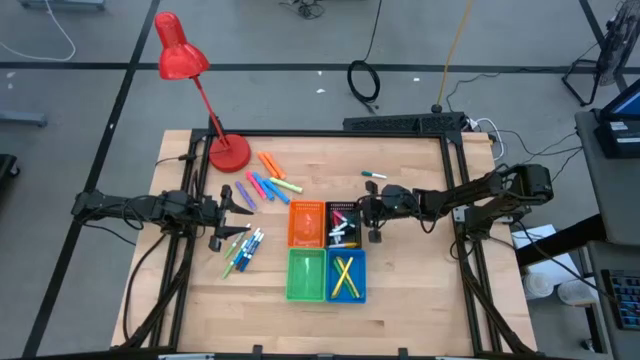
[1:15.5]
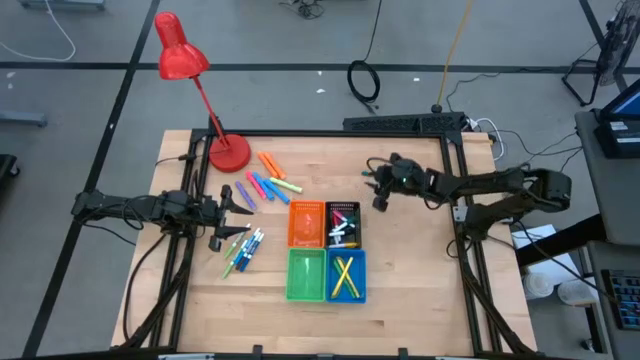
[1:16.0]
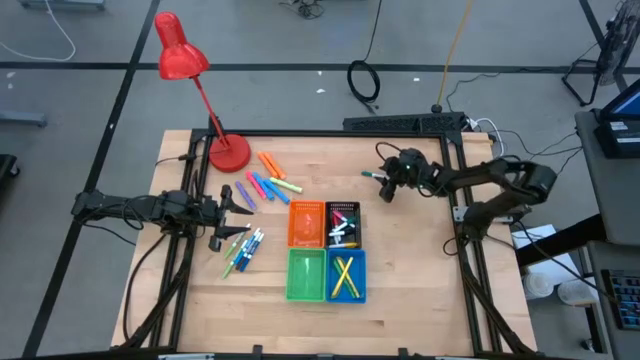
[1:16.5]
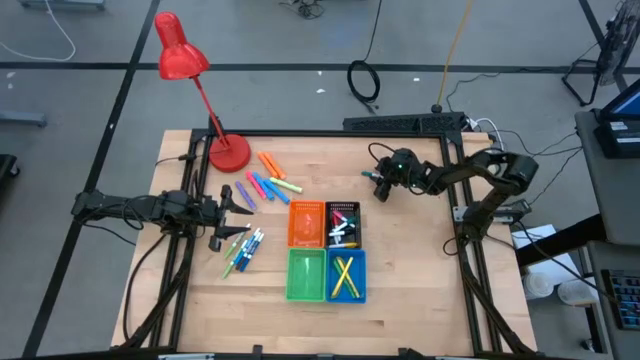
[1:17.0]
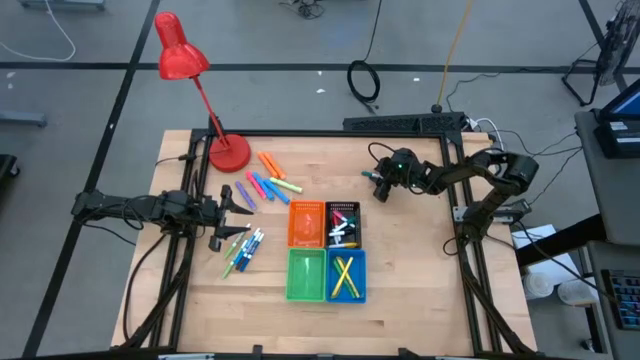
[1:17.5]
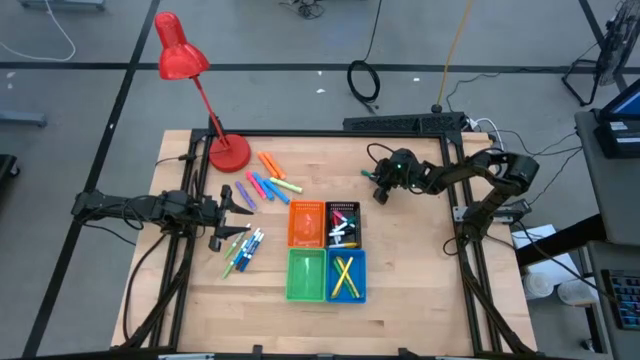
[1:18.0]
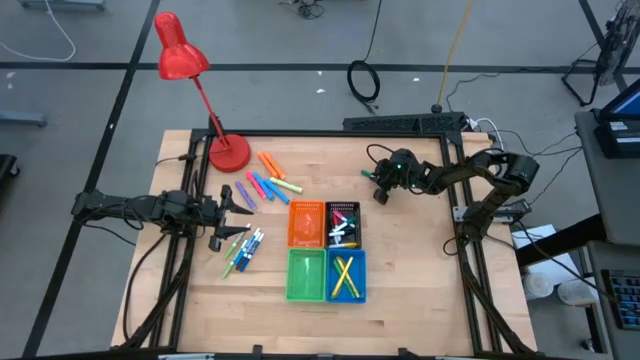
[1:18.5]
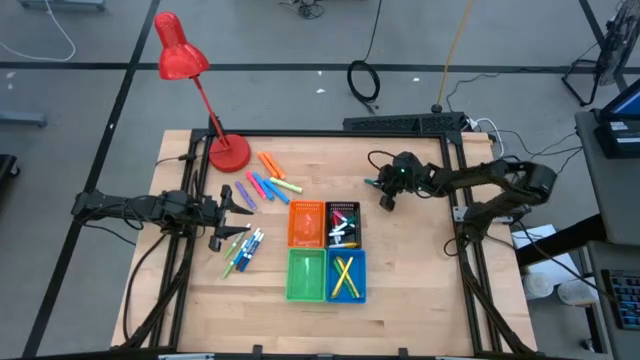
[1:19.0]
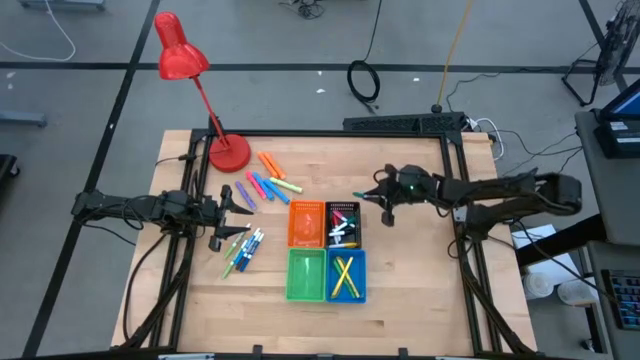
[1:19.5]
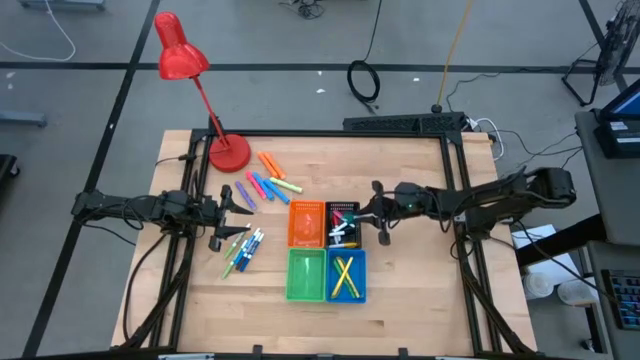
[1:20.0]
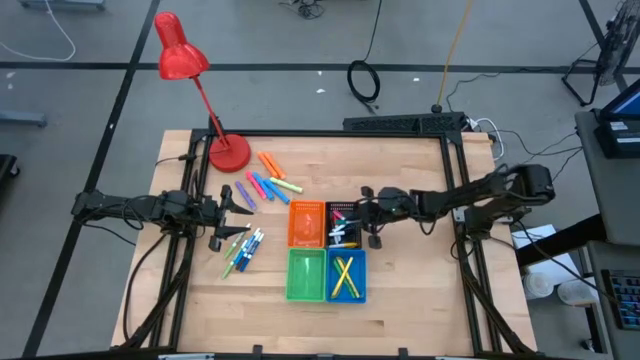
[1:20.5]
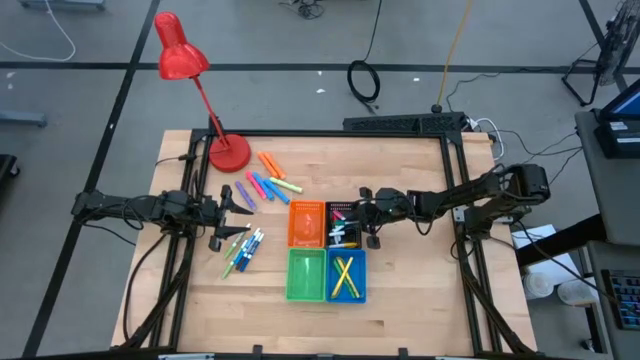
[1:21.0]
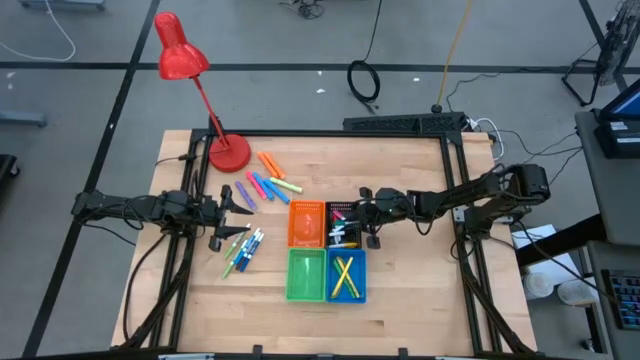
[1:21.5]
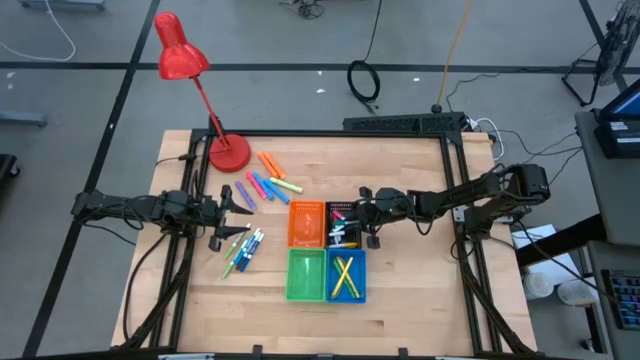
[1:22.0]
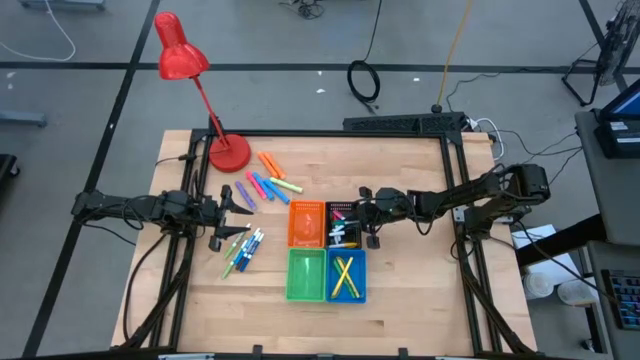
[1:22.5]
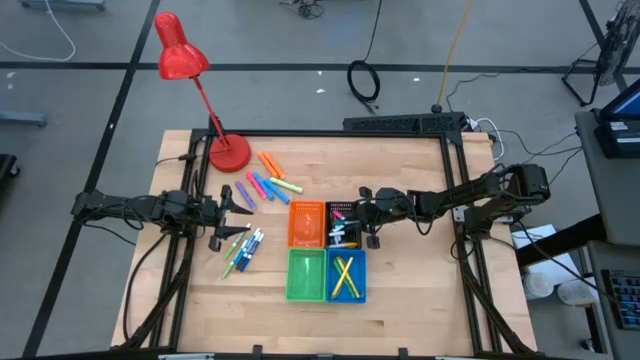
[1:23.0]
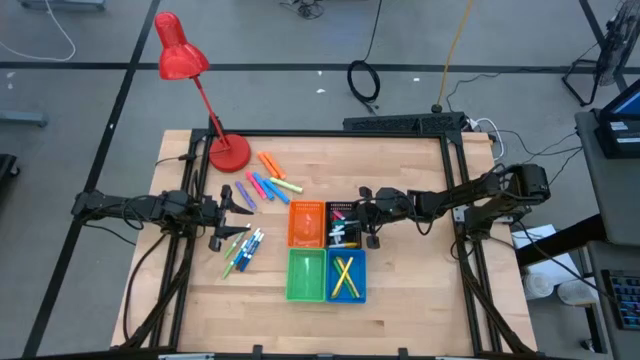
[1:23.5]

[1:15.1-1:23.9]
Task: Pick & Place Markers
Put the green highlighter pen into the black basket

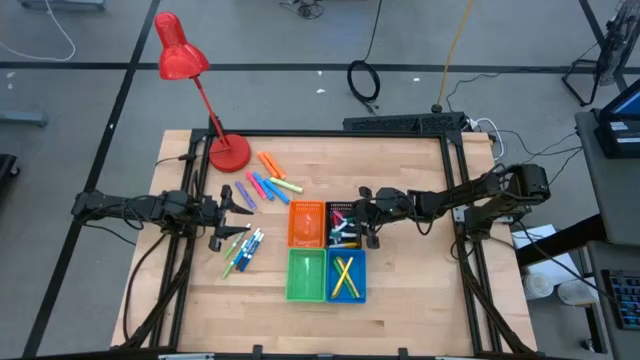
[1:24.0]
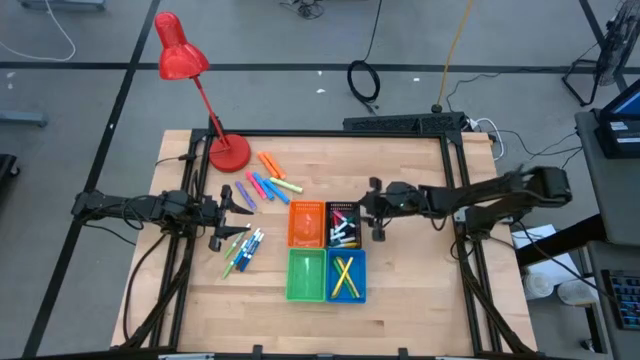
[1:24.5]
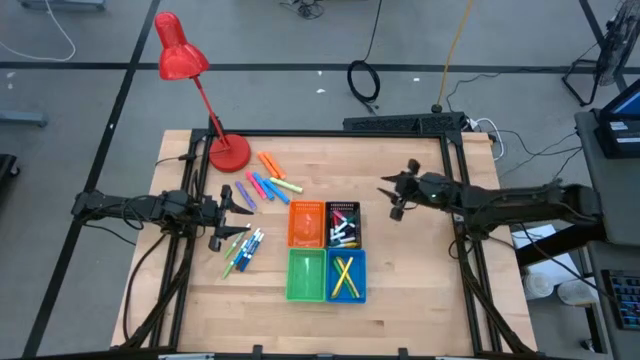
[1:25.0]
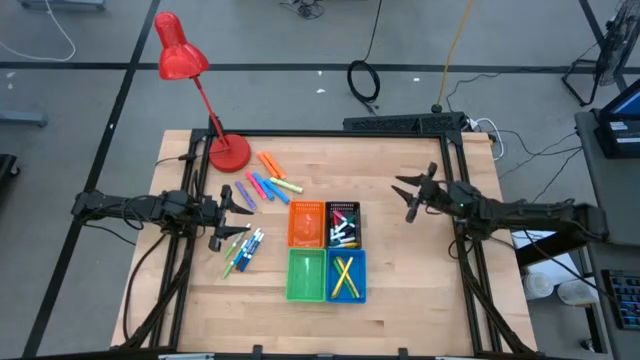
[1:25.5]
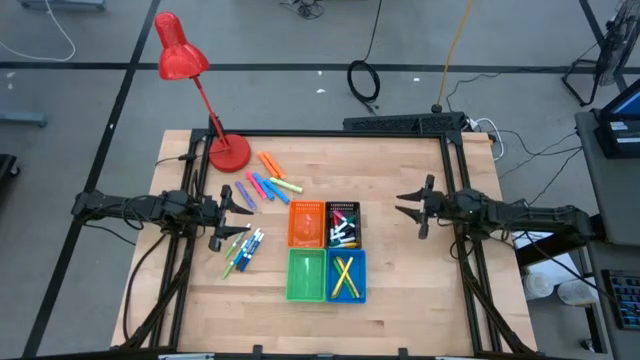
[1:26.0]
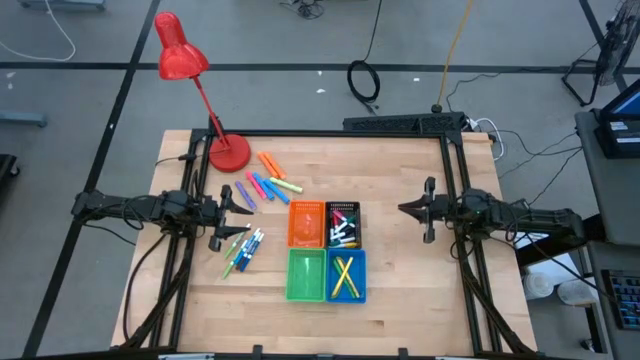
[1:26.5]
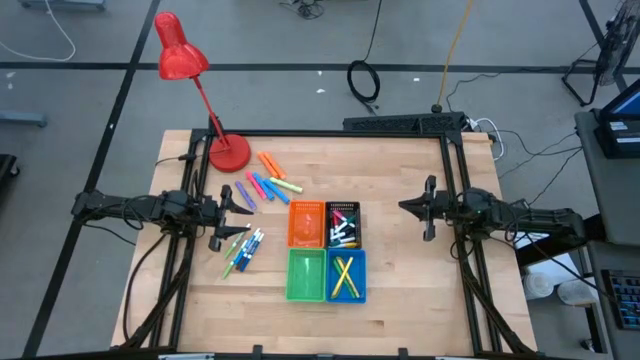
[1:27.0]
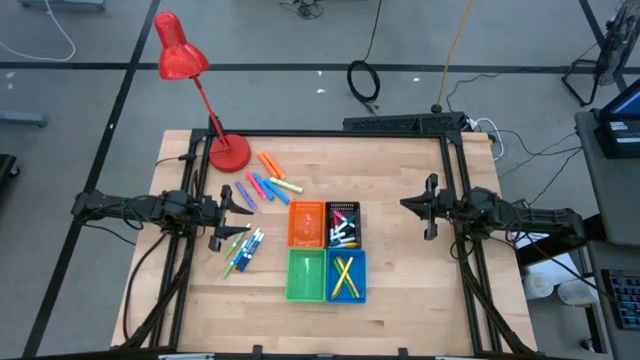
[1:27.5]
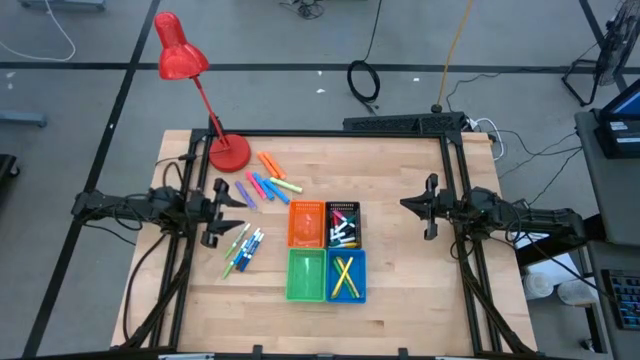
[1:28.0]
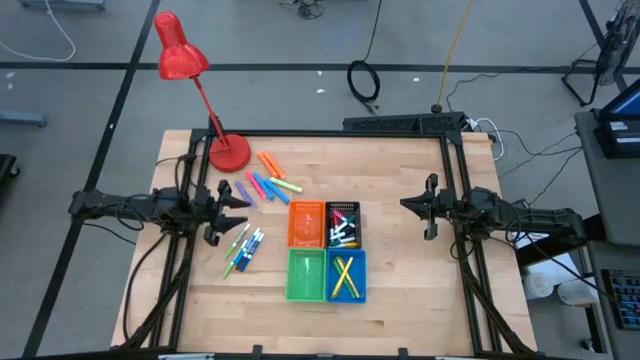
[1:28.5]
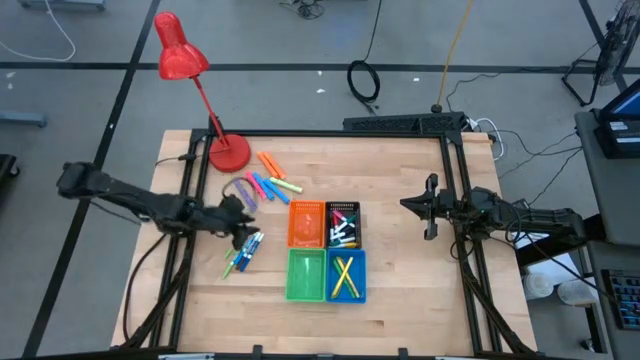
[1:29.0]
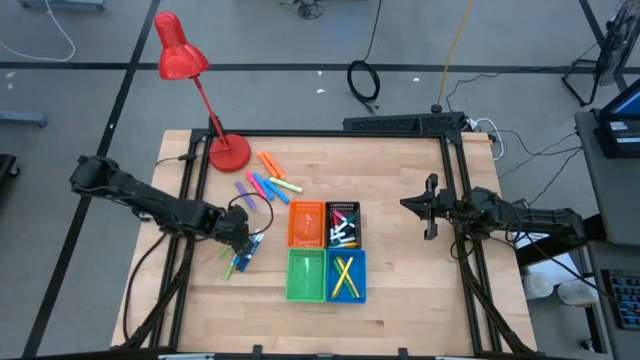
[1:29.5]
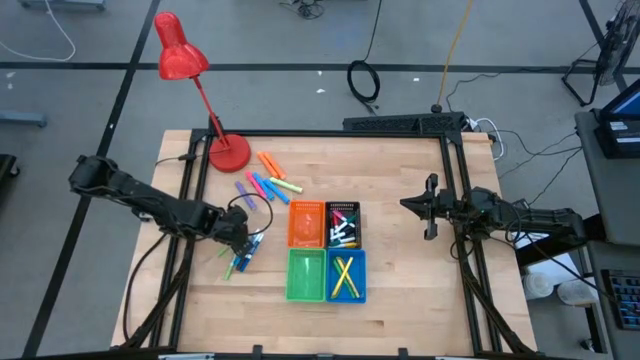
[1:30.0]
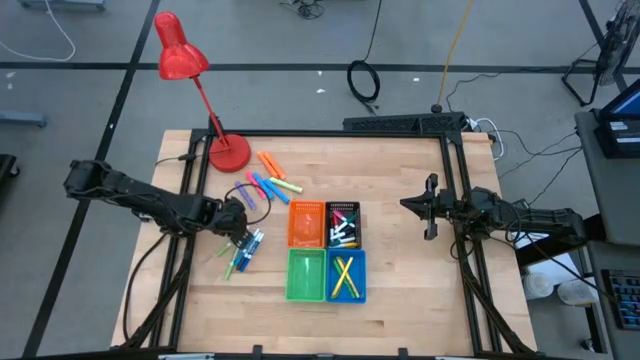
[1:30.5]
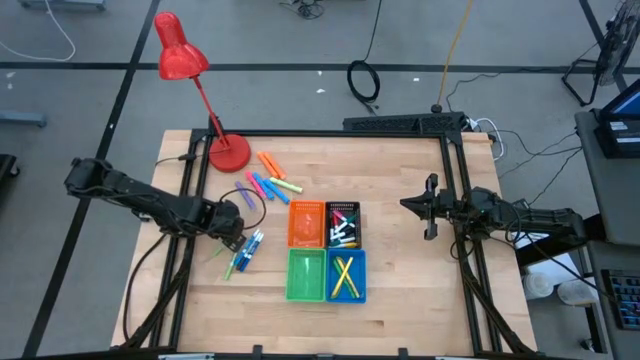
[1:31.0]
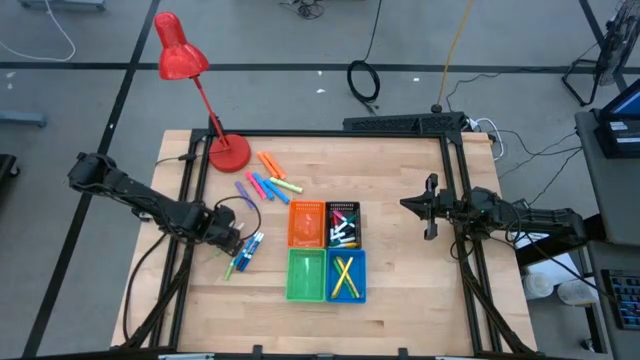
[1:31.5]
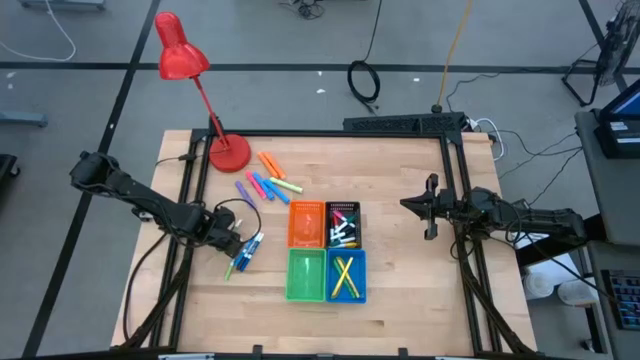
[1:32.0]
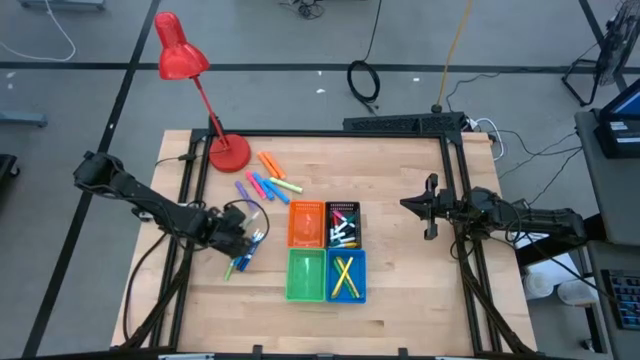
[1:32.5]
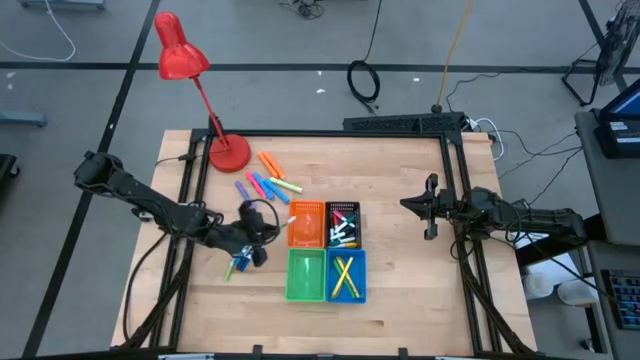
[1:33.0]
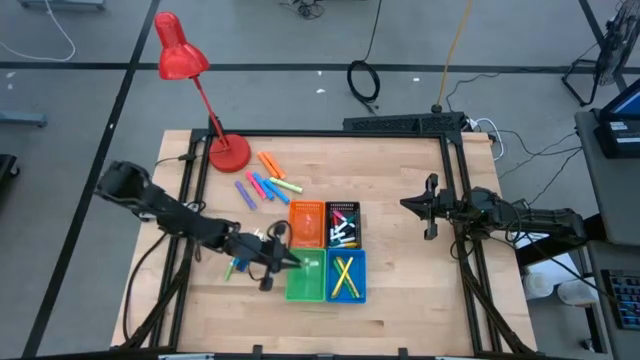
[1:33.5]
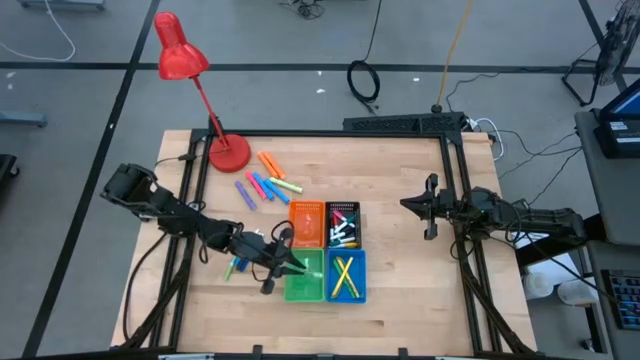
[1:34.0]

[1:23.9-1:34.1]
Put the left green marker pen into the green basket

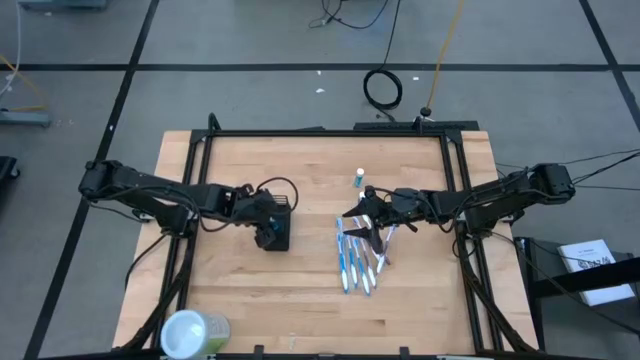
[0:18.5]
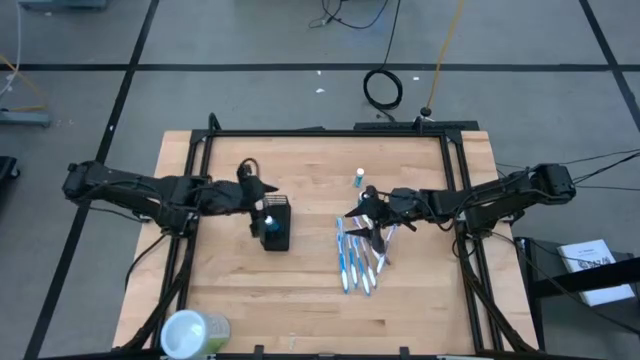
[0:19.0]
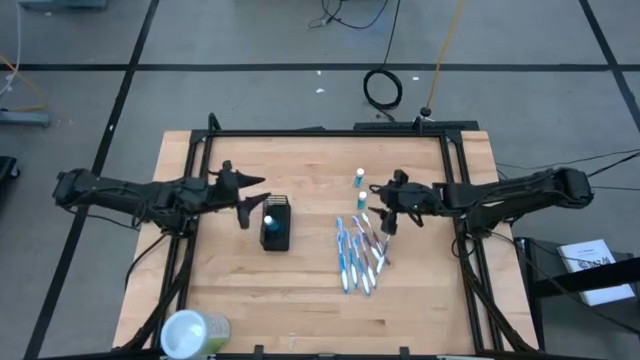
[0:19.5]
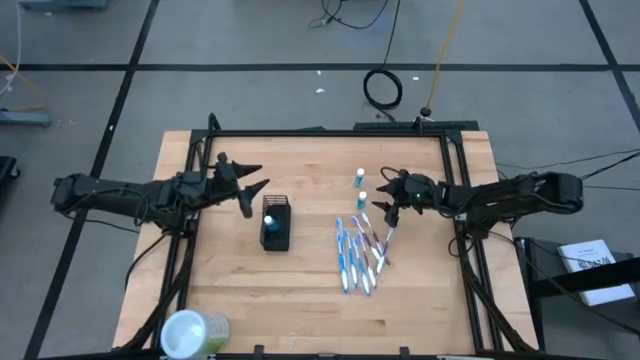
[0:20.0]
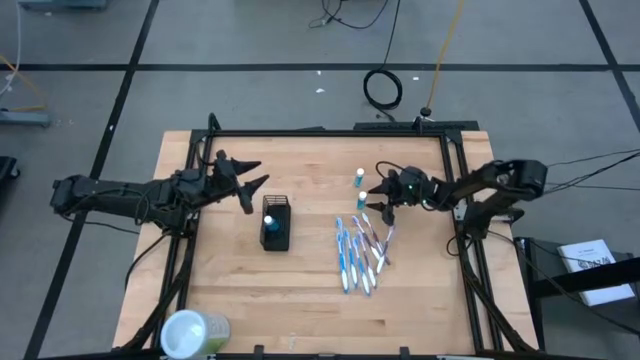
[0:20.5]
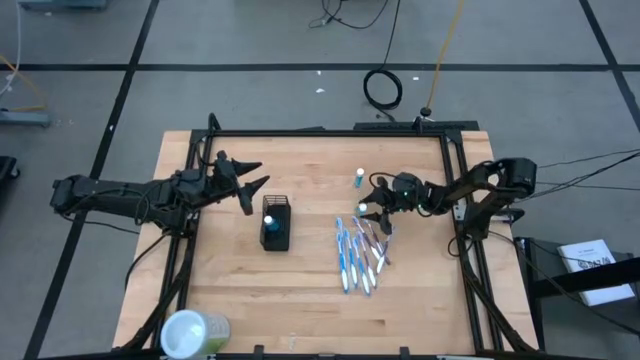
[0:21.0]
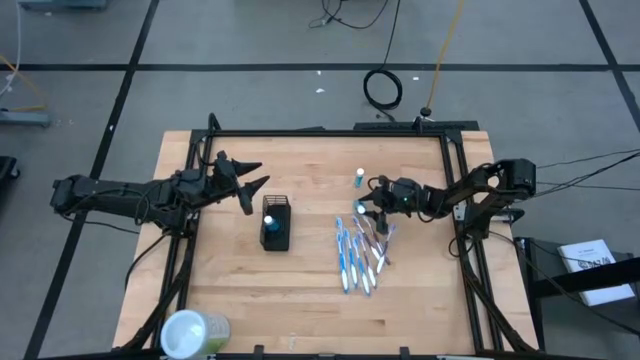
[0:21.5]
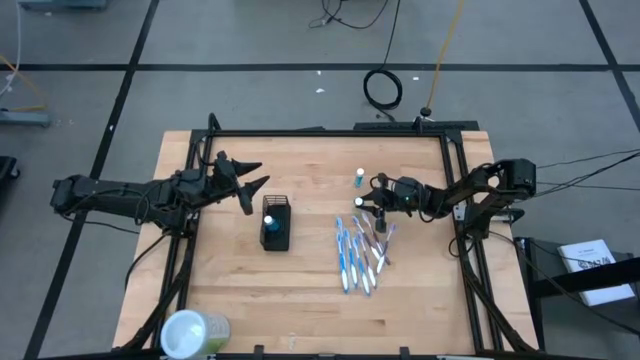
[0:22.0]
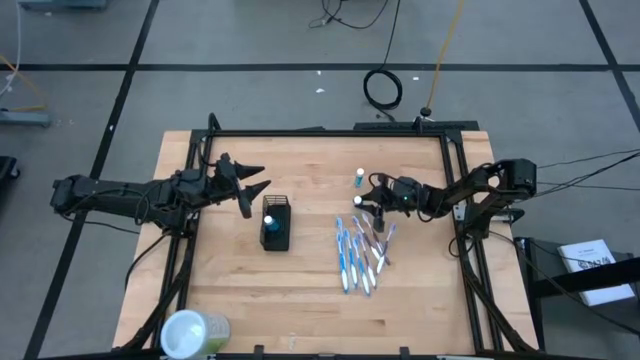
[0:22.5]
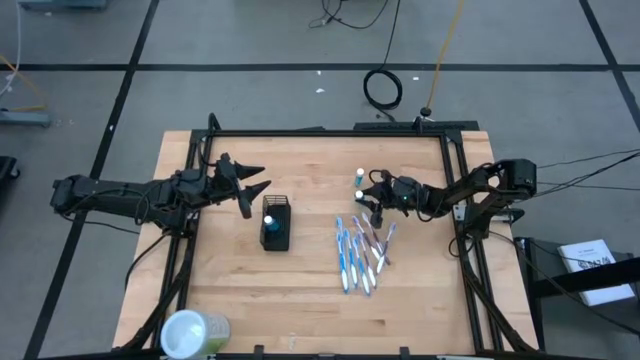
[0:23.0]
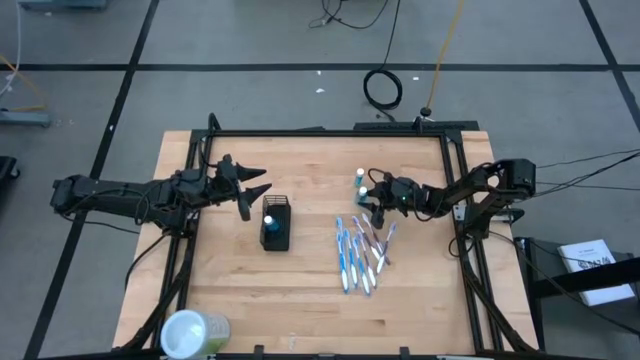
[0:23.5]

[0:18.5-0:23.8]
Task: Pick & Place toothbrushing station
Put the bottom mouthwash into the middle compartment of the mesh organizer
